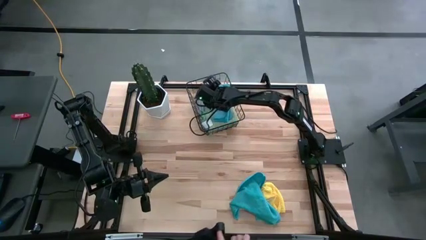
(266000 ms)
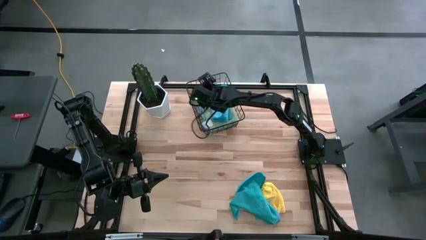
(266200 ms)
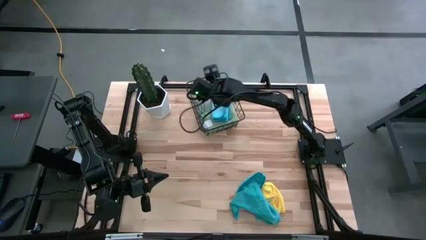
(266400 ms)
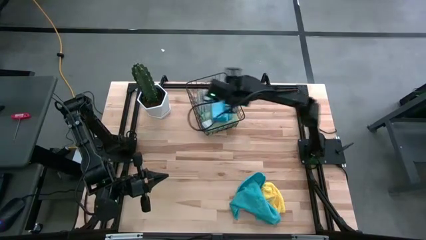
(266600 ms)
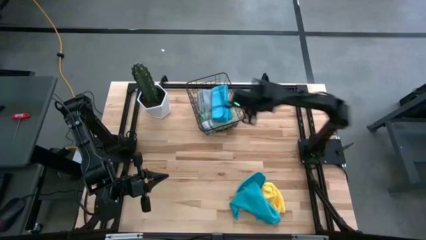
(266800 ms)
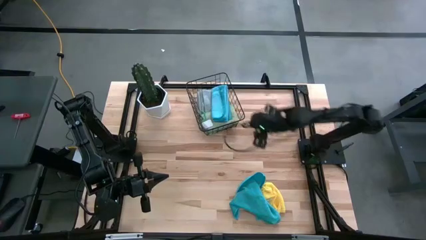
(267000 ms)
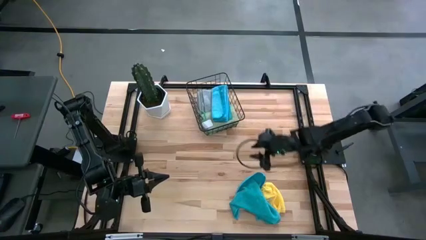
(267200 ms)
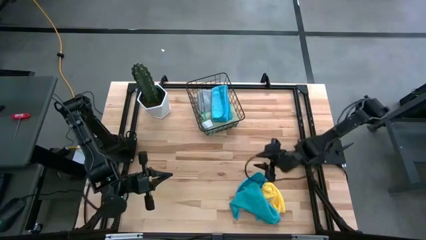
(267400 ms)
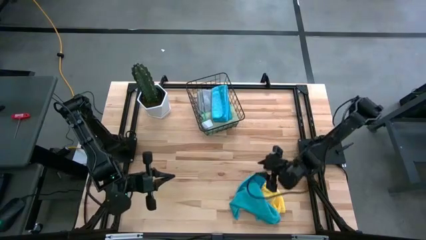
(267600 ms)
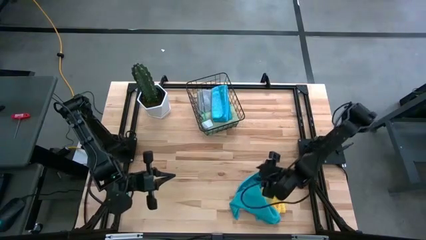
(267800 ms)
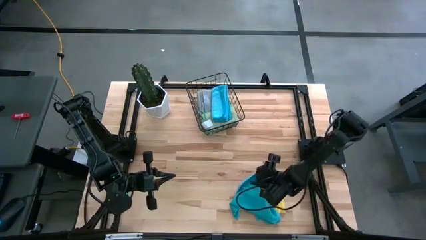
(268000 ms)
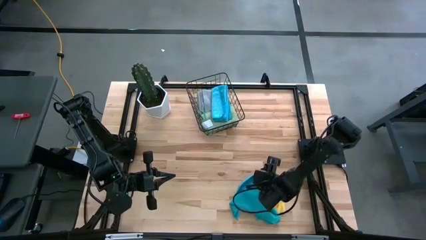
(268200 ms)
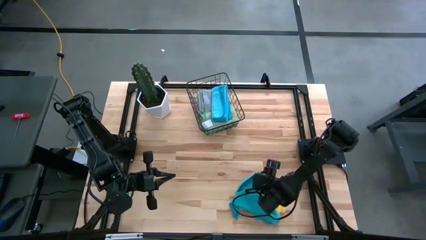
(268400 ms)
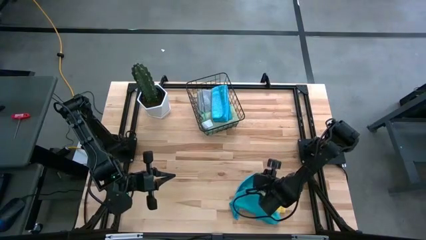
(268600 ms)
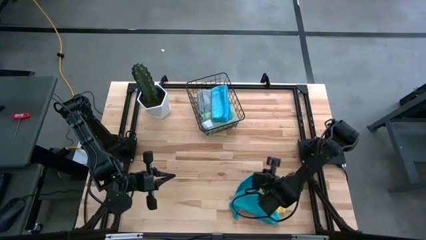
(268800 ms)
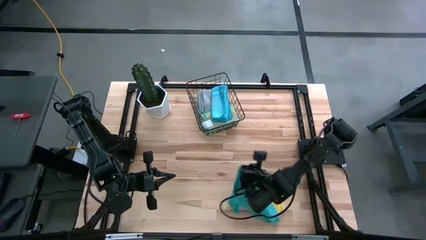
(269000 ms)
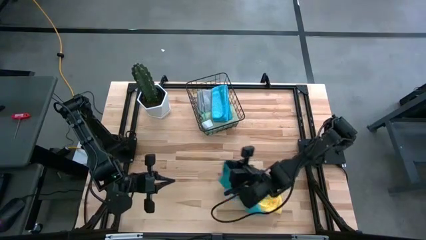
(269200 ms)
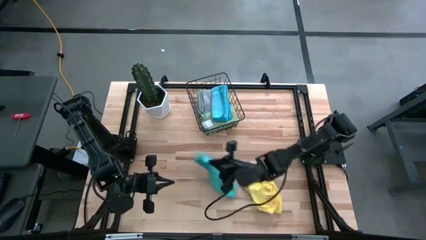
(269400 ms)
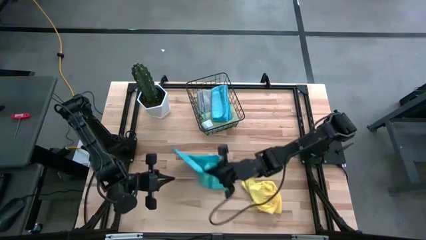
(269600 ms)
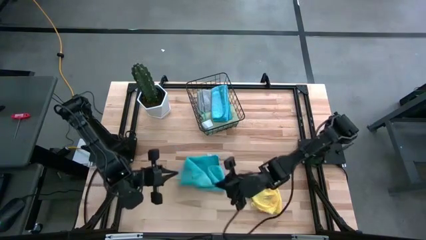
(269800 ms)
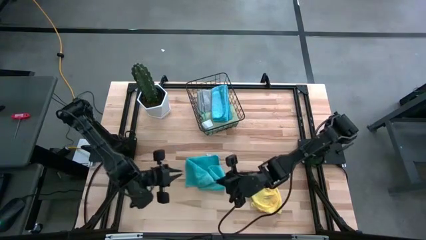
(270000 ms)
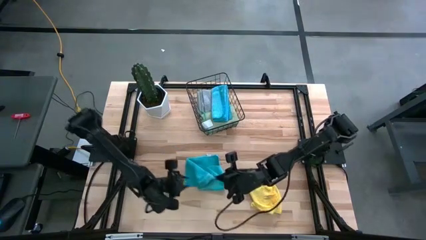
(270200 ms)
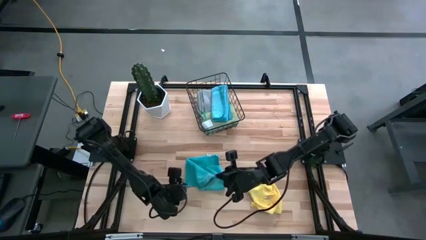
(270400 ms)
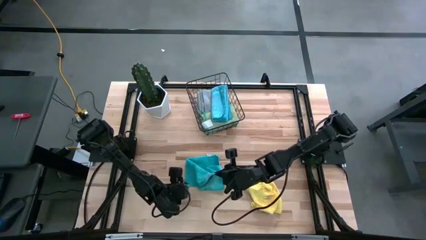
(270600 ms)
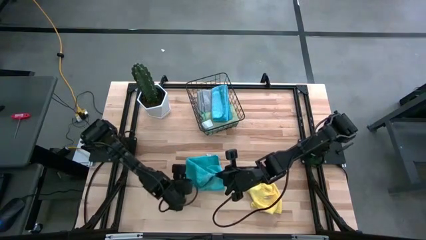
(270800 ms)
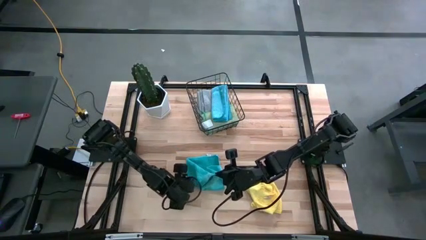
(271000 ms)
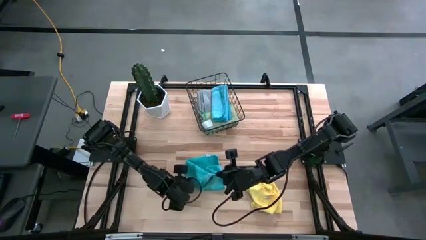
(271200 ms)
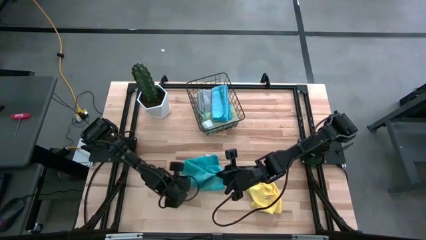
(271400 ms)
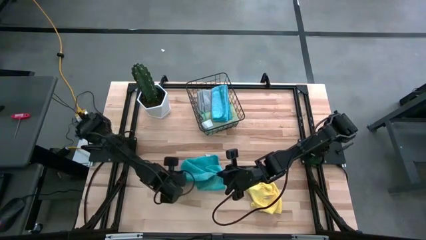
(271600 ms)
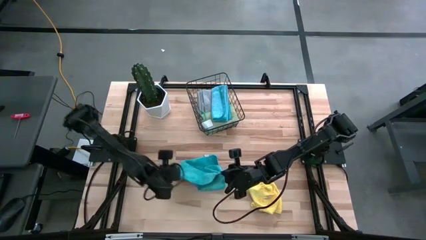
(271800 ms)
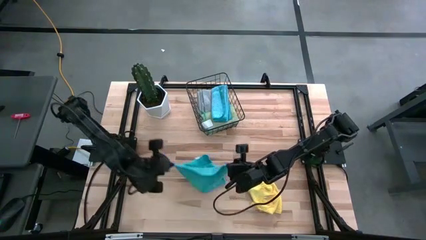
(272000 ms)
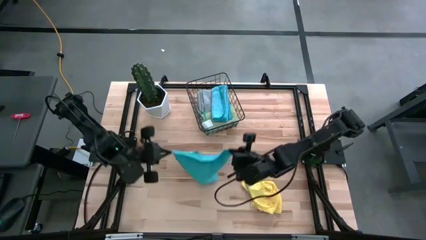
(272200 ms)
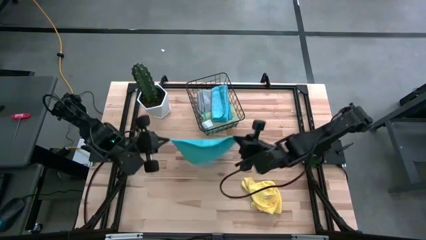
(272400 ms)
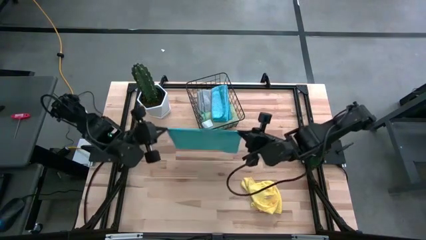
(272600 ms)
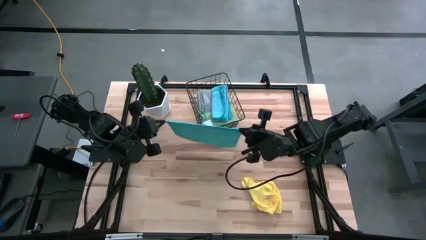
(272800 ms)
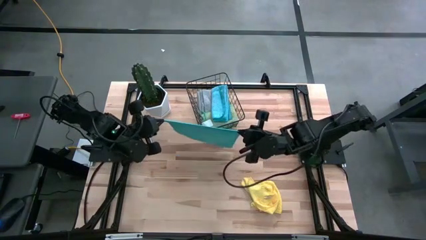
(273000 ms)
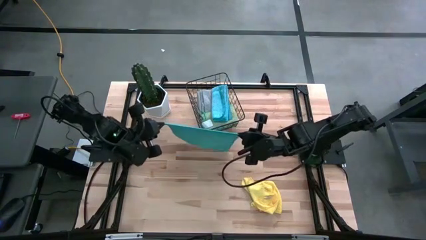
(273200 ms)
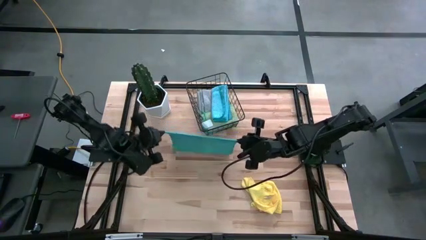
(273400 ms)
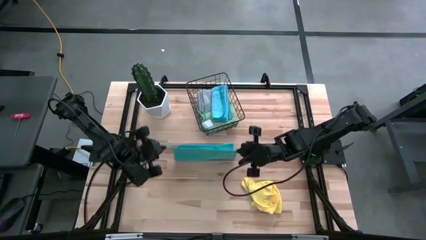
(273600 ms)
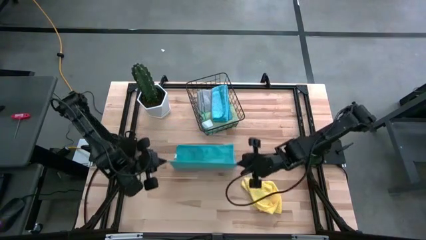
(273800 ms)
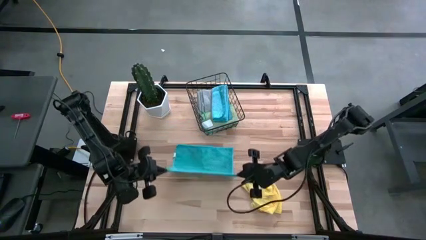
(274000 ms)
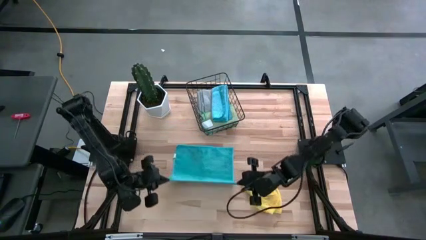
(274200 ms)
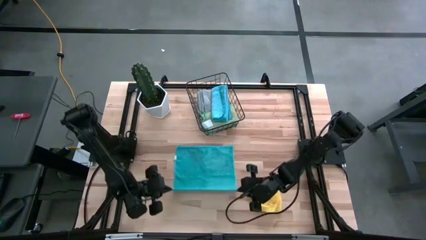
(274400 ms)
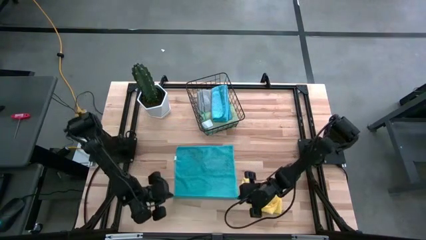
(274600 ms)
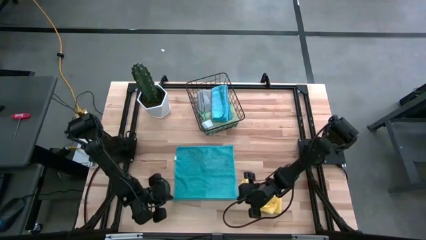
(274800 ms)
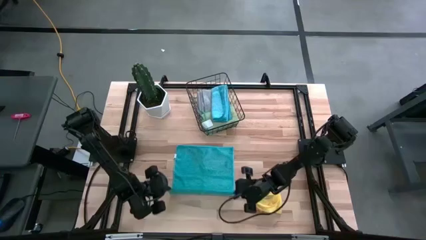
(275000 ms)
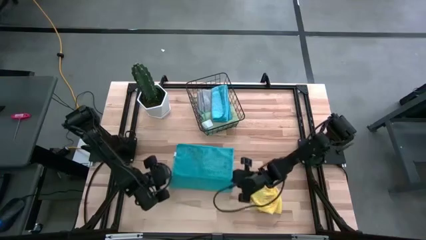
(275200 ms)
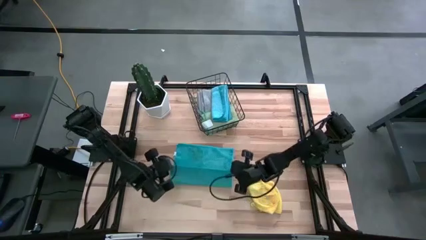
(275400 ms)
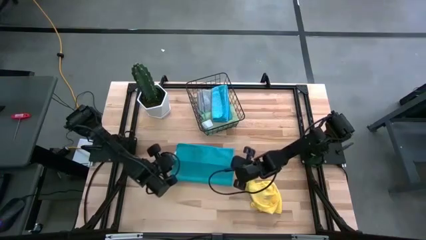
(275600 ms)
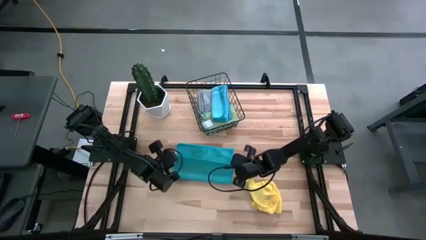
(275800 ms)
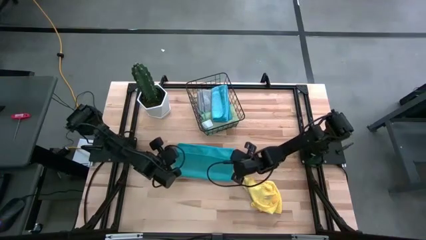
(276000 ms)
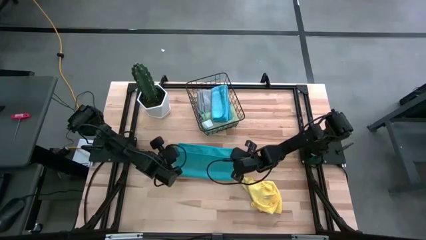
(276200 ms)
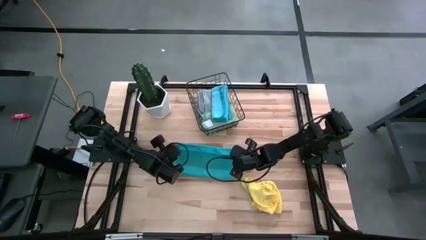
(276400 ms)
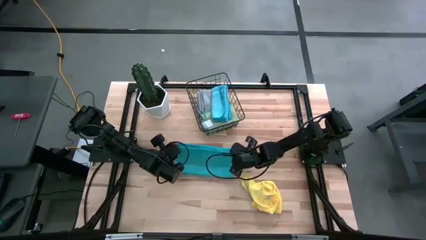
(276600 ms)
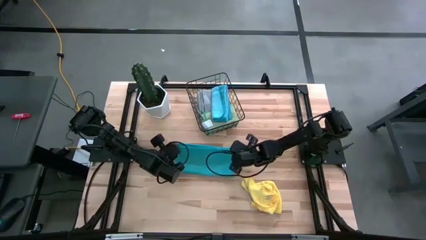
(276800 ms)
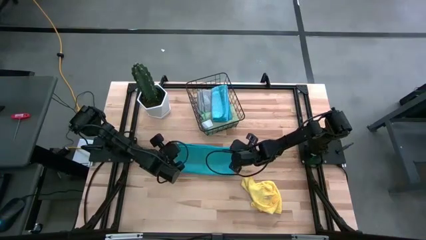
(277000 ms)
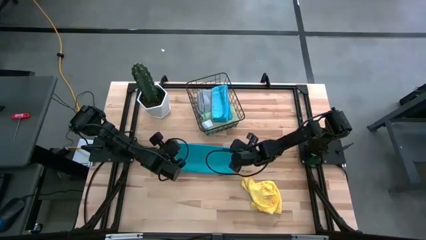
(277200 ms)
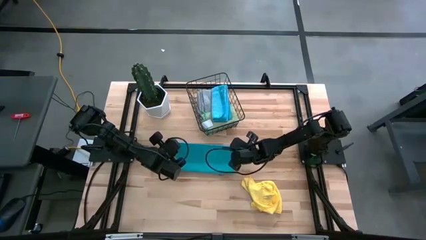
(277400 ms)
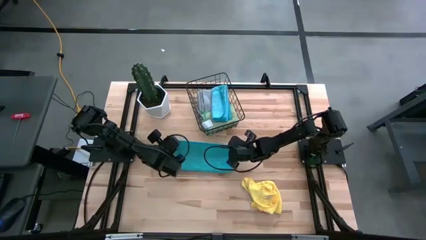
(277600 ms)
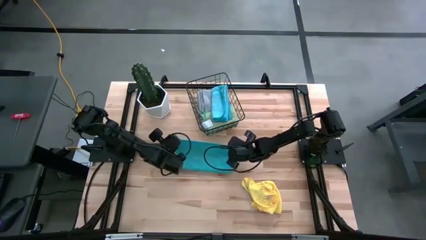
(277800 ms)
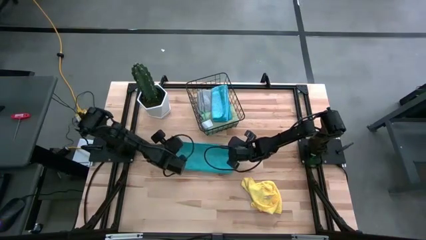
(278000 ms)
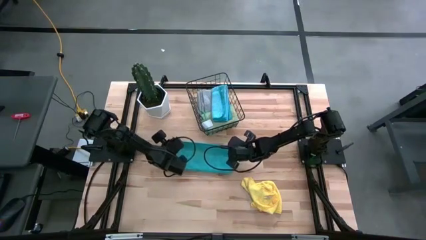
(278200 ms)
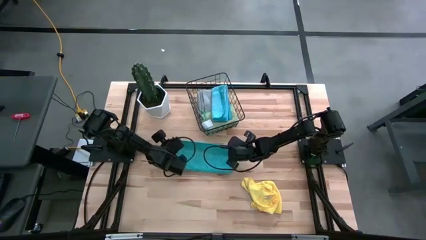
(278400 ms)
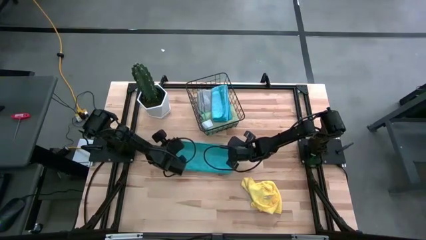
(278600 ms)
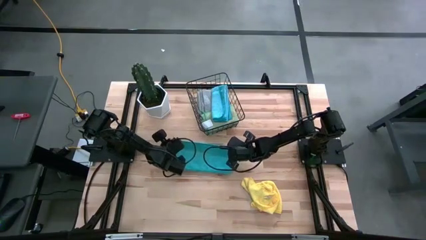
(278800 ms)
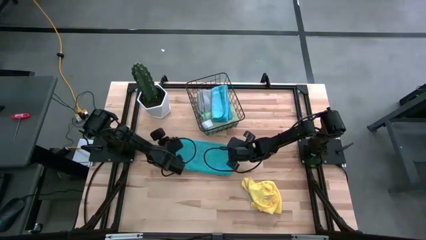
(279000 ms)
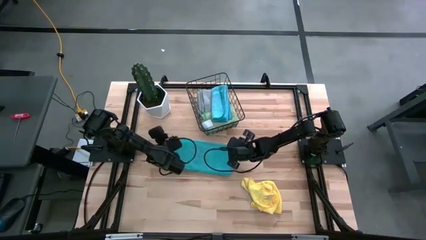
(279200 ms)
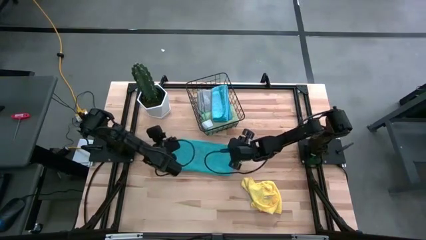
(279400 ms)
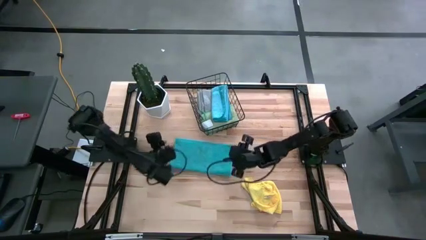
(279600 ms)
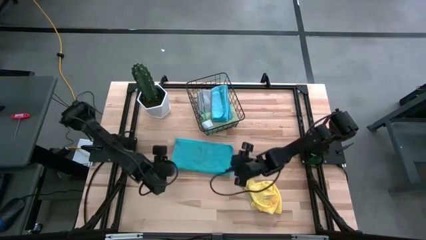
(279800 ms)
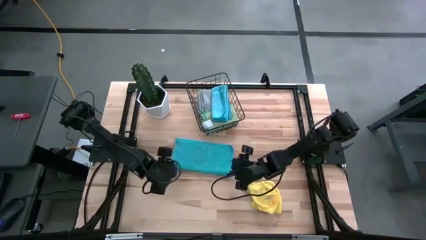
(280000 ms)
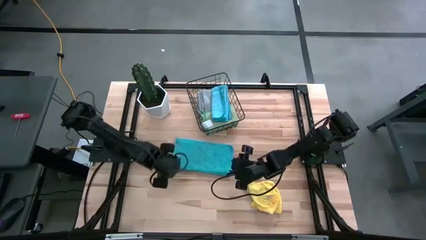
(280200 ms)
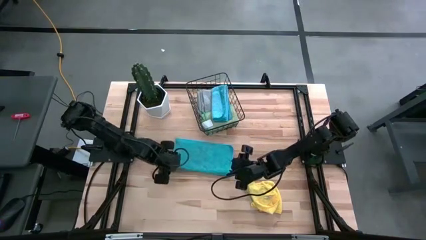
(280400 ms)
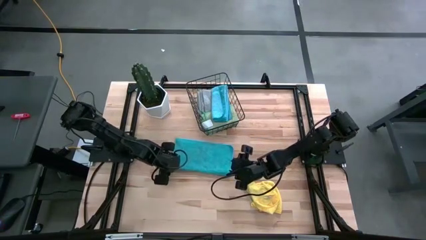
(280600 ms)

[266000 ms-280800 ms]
Task: Fold microfiber towels
Fold the blue microfiber cloth

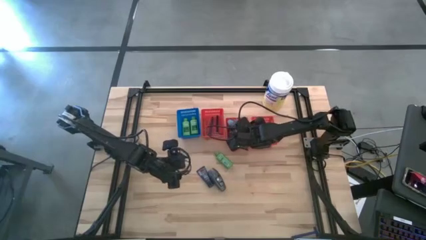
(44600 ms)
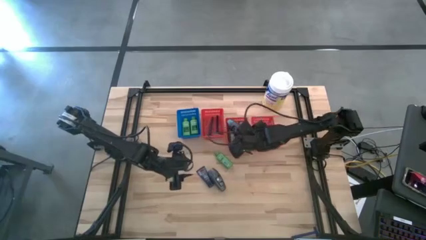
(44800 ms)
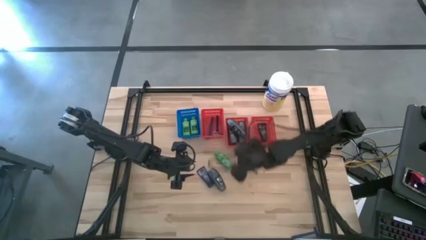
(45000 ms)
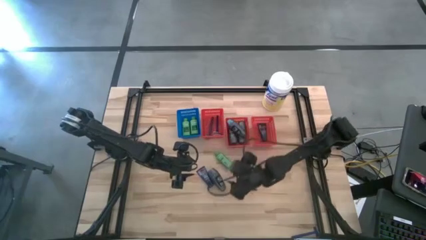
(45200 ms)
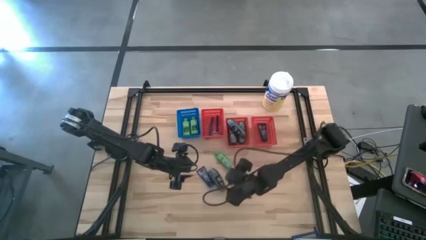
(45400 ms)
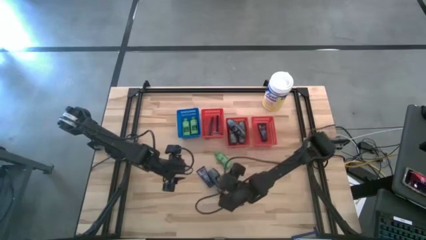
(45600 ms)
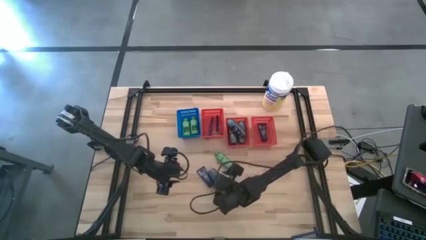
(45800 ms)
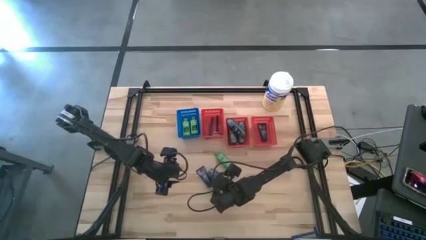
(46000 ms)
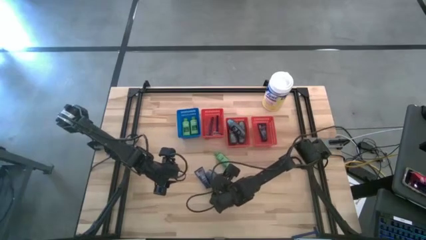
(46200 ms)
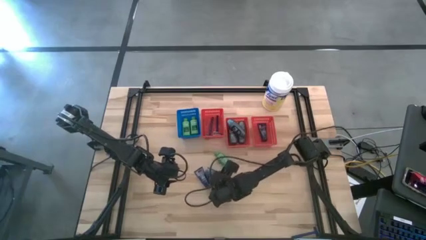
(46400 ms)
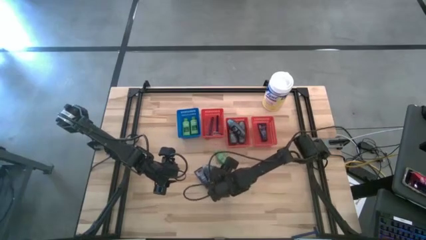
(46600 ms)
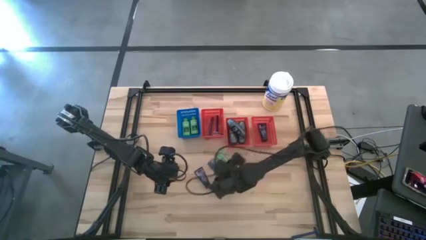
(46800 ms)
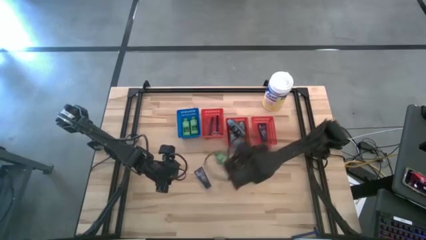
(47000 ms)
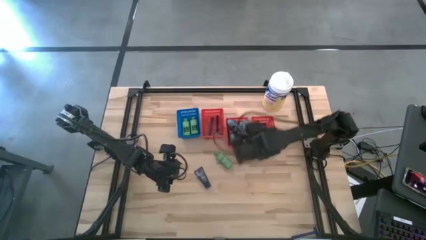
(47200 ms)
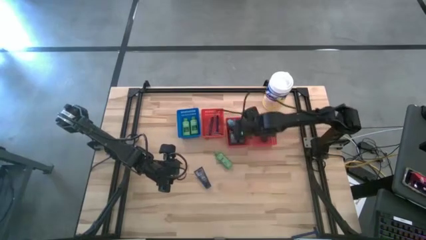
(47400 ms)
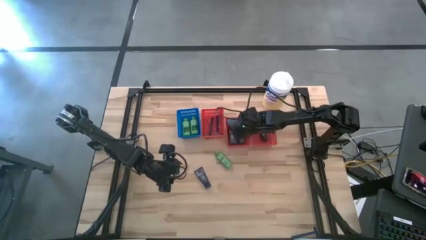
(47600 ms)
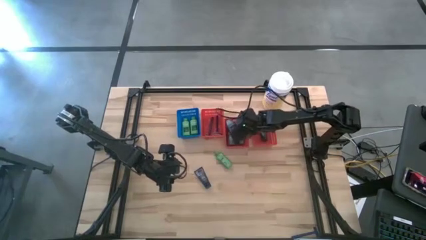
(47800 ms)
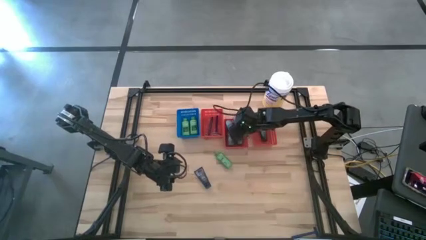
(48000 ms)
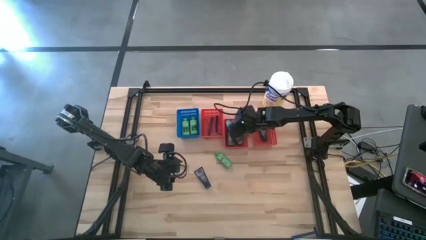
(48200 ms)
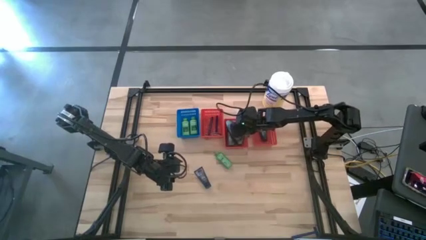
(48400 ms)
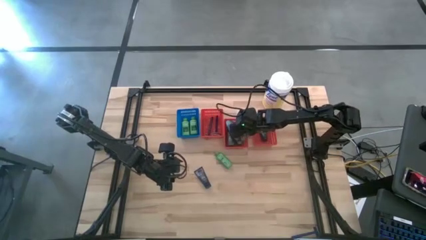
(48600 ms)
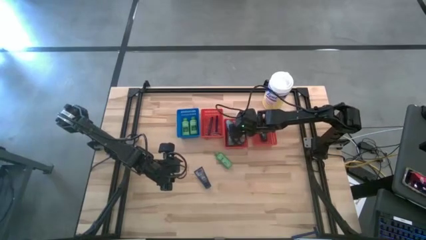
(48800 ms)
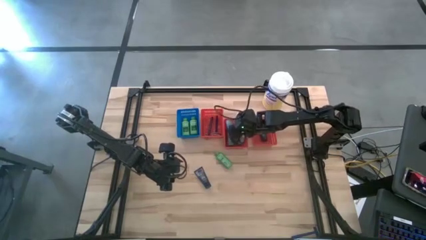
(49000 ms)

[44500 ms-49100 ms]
Task: Pick & Place Travel size toiletries
Put the black deodorant into the middle red bin
